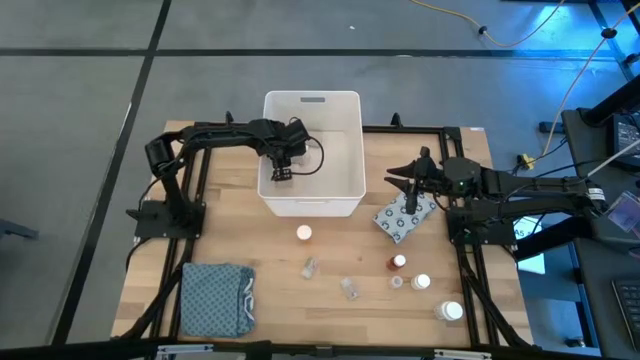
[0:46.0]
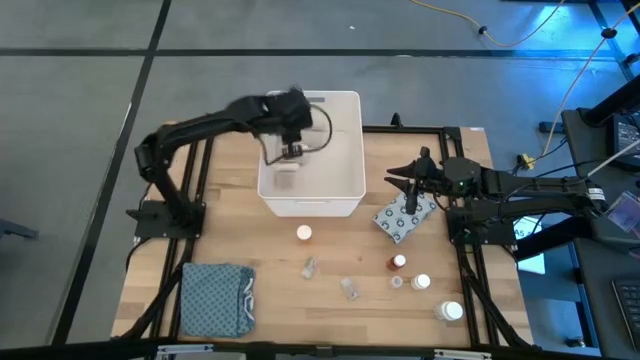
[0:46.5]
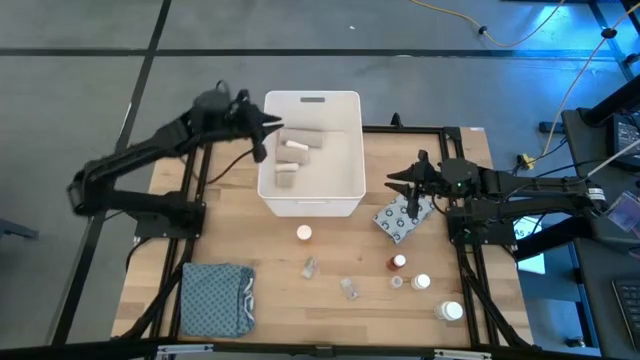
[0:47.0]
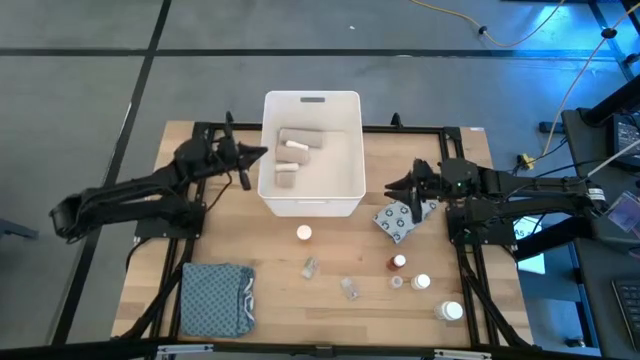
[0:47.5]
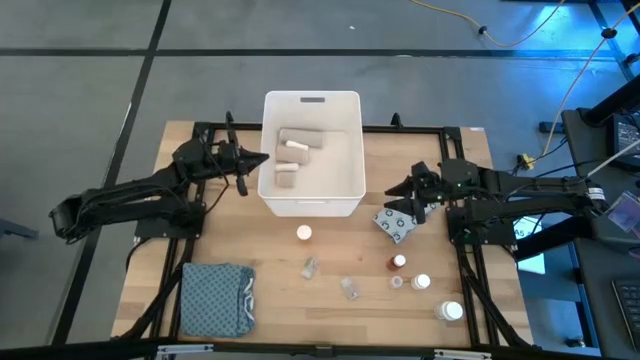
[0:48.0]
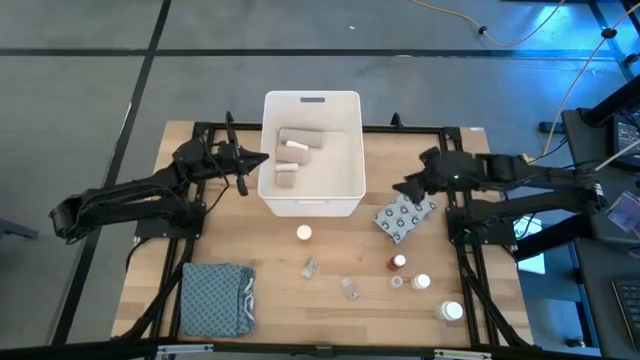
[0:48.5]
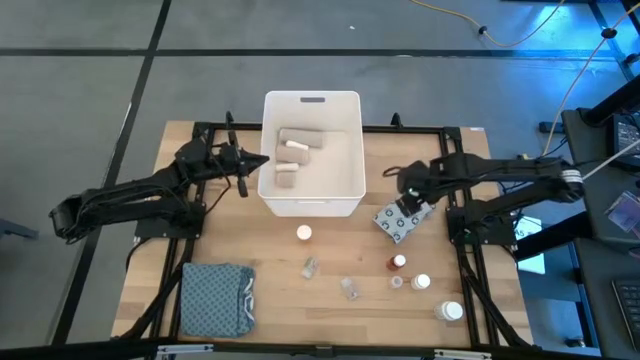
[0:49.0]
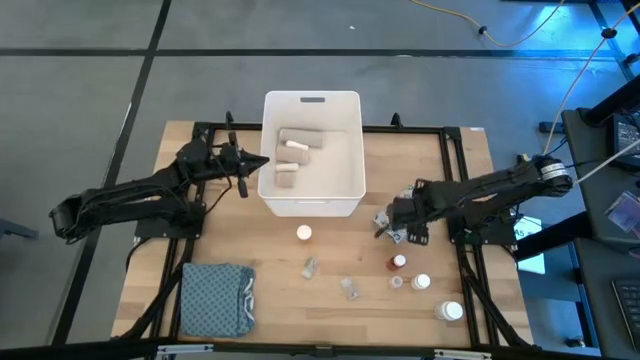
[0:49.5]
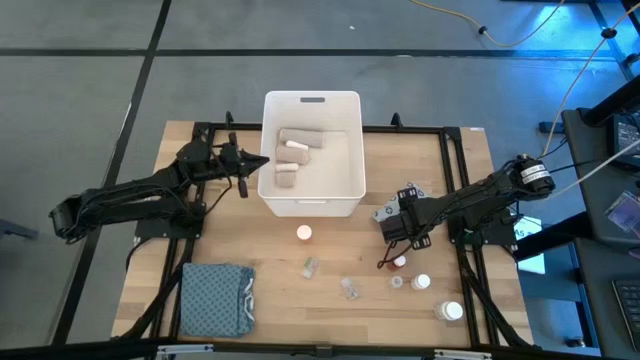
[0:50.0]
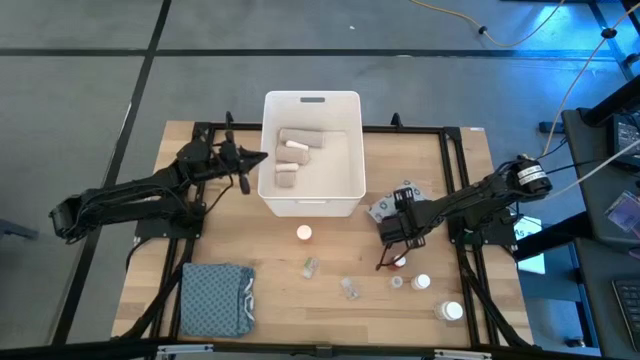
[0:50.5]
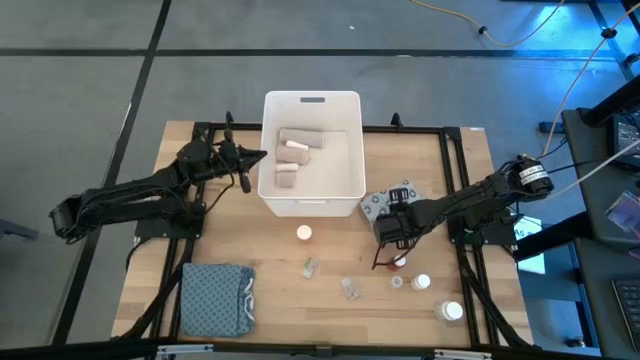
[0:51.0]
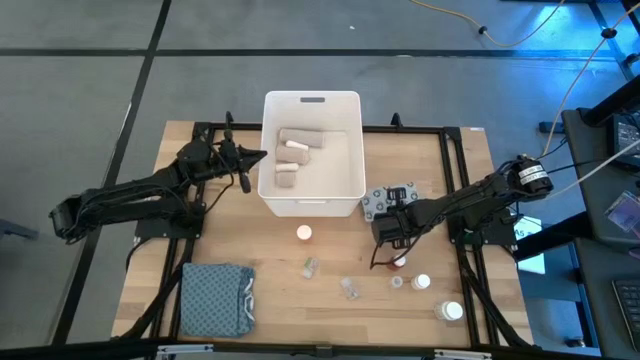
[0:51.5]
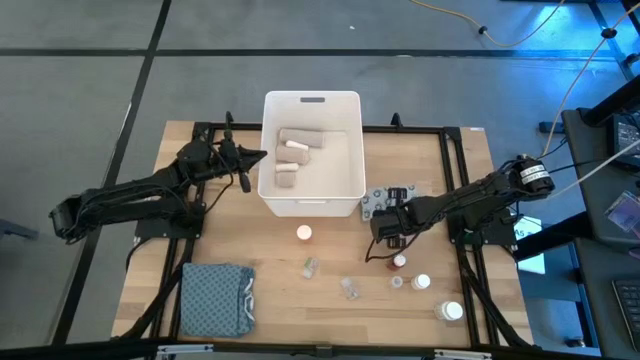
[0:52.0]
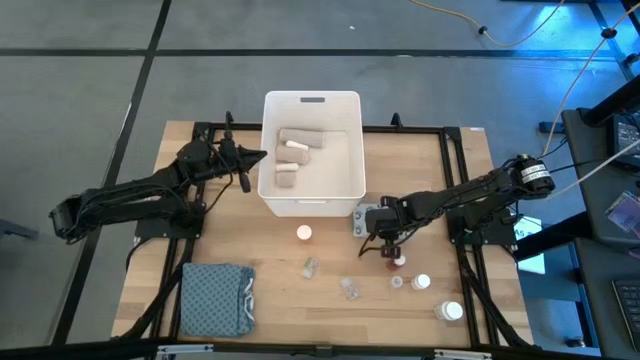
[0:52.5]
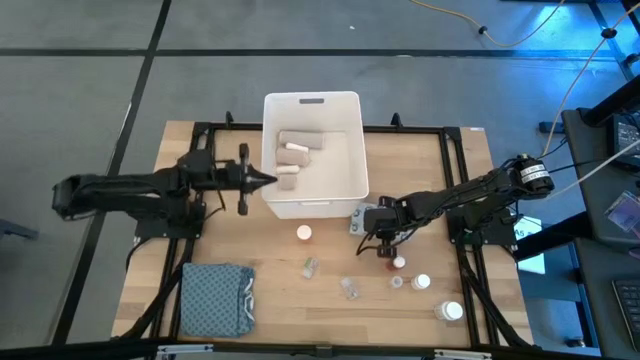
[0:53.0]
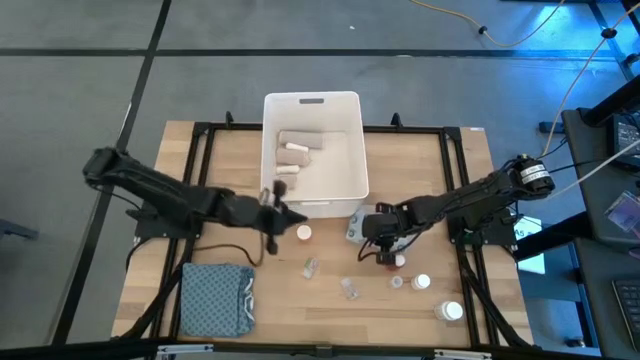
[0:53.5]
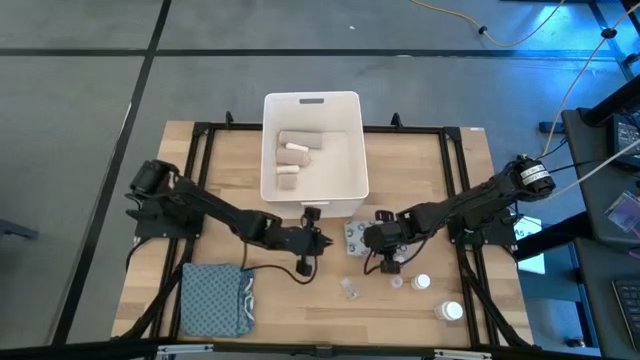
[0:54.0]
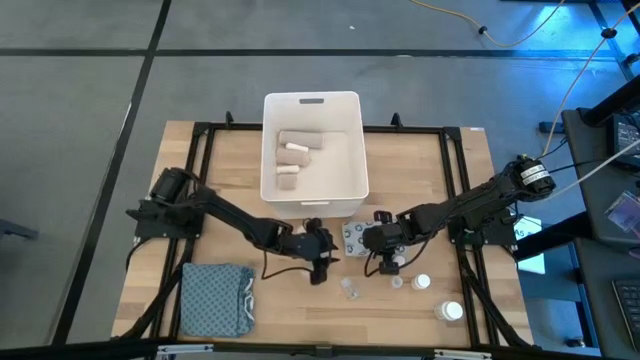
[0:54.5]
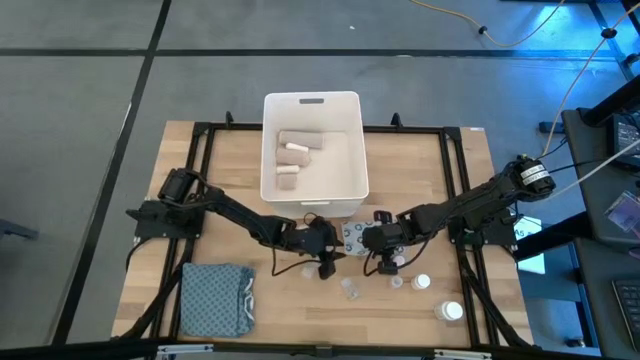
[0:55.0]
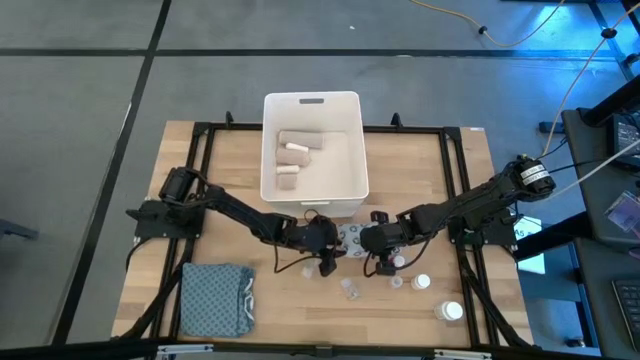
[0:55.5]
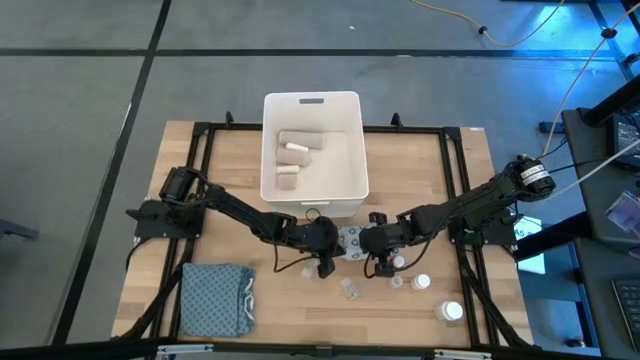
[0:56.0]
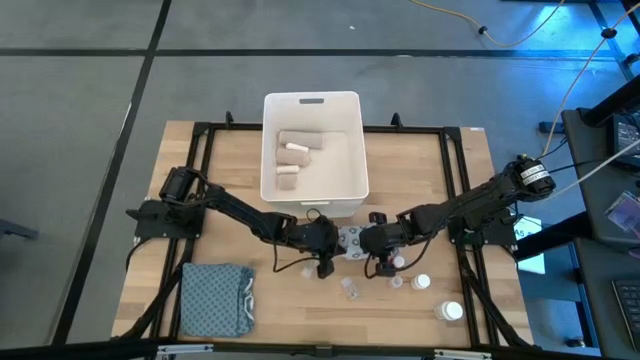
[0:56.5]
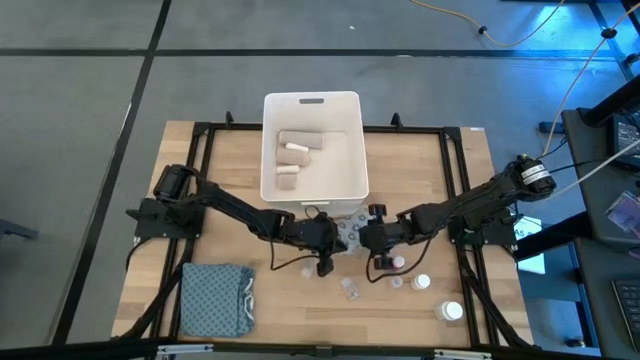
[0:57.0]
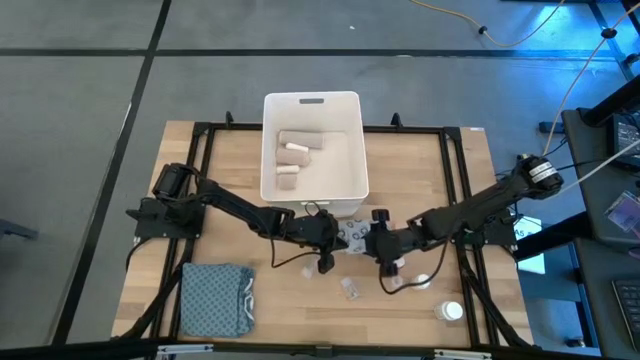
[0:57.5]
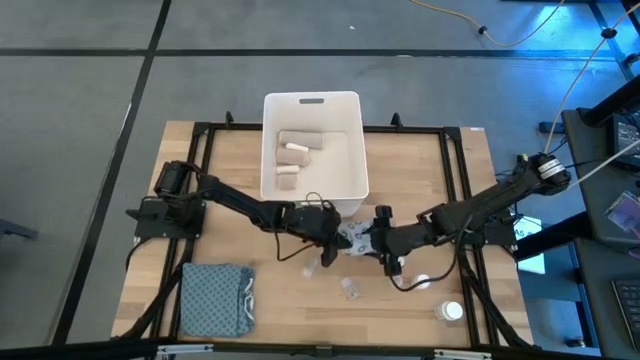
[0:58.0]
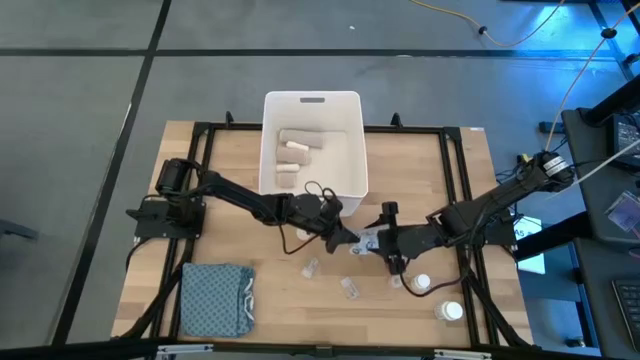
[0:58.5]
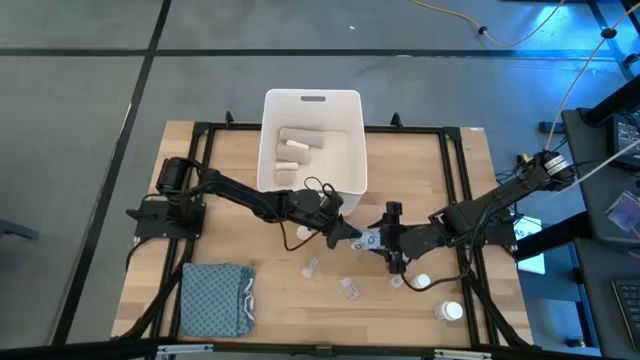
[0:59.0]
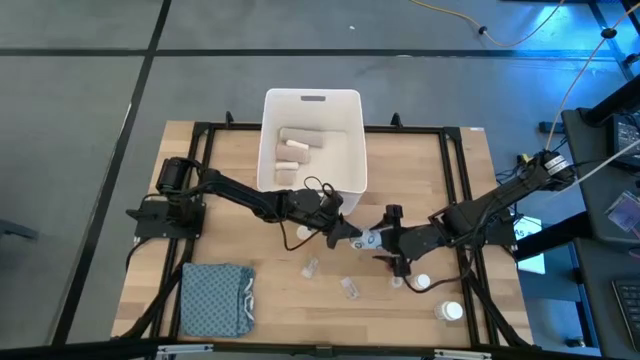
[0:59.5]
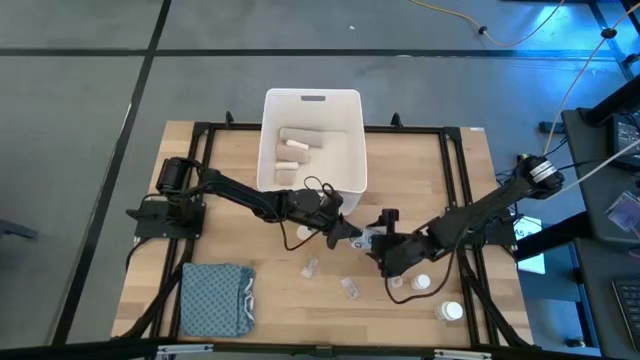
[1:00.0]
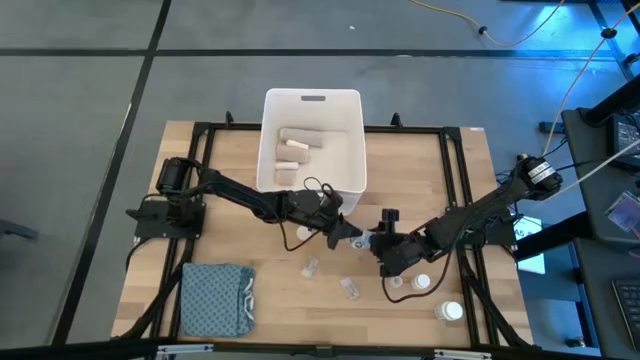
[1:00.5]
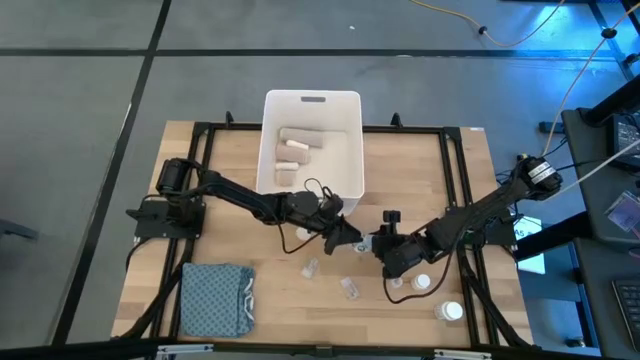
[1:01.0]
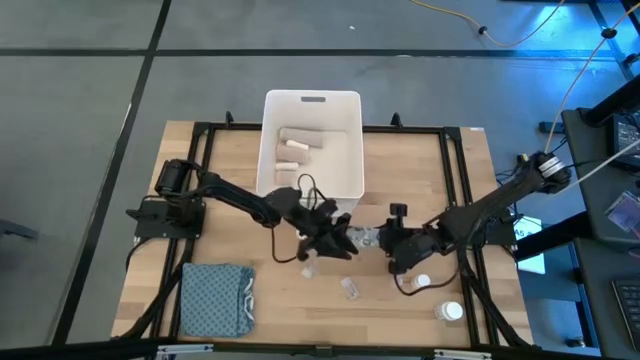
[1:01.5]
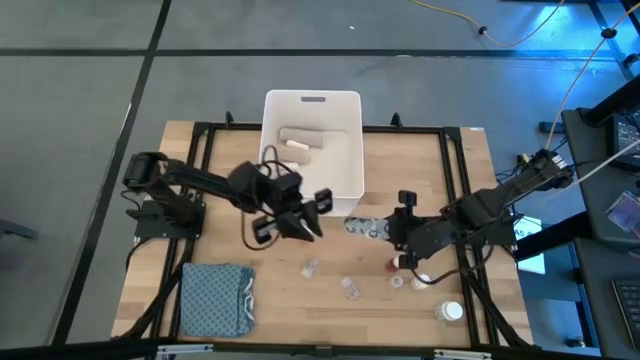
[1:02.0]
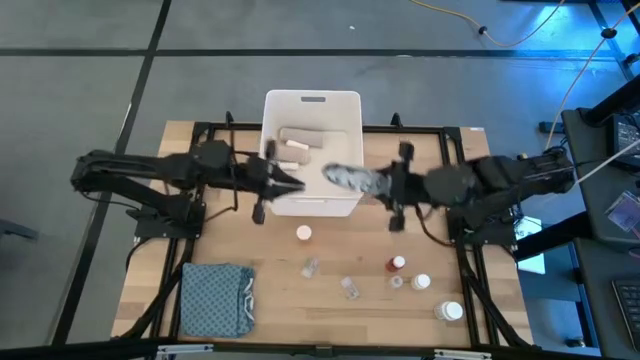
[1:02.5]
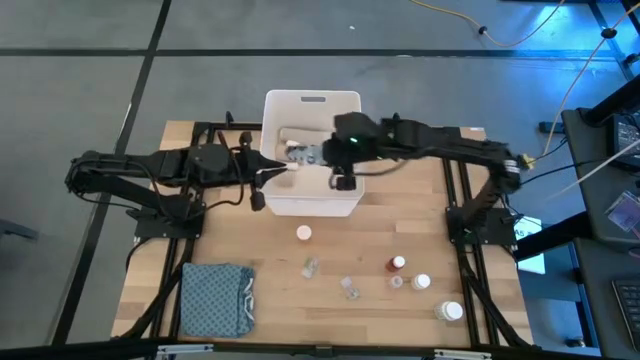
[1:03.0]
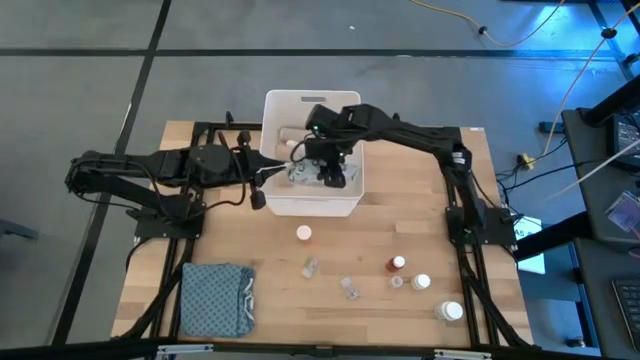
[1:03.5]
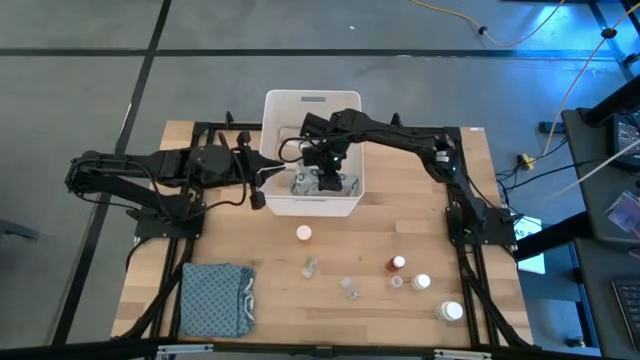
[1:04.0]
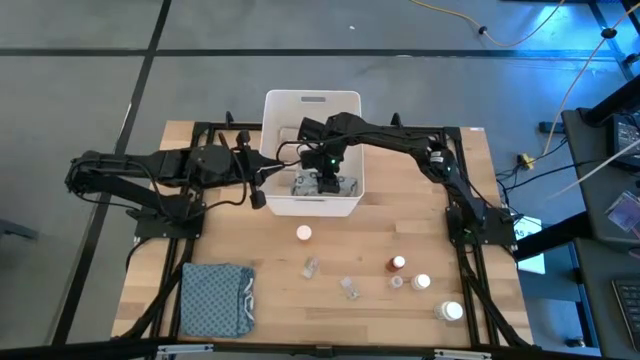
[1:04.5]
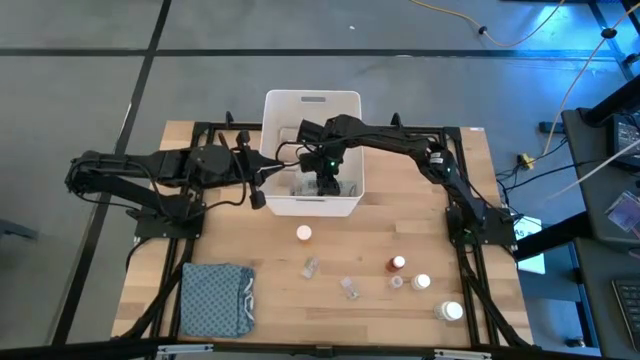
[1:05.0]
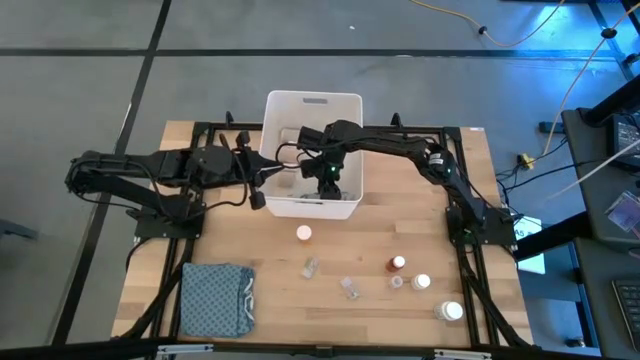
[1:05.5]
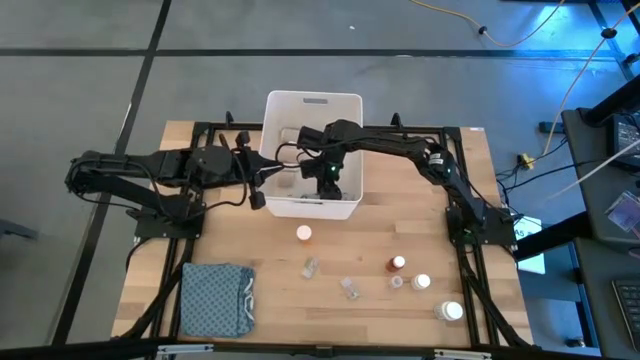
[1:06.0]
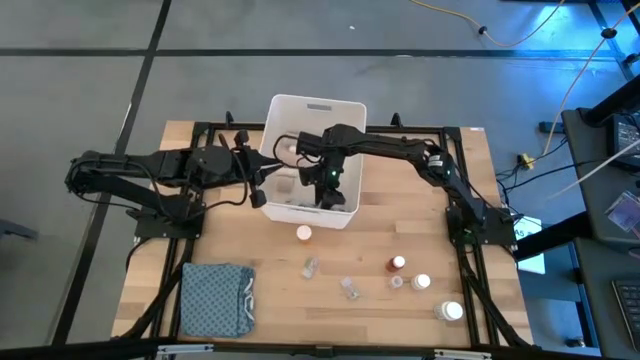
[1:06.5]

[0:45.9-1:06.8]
Task: Pick & place medical supplies in basket/bin
Put the white mailer bag into the white bin
